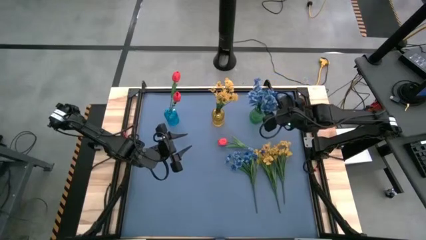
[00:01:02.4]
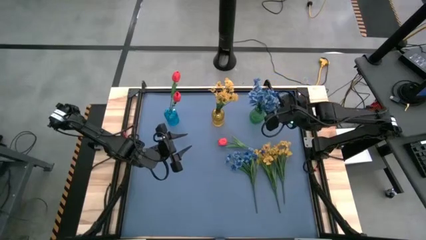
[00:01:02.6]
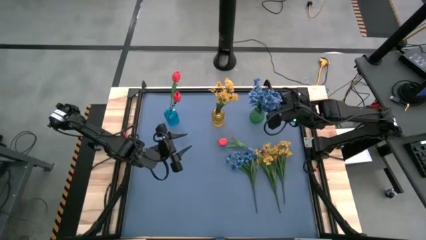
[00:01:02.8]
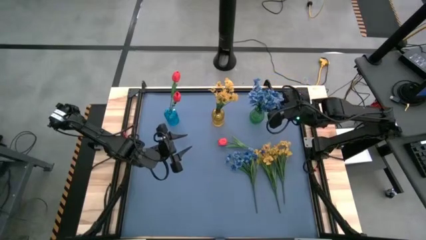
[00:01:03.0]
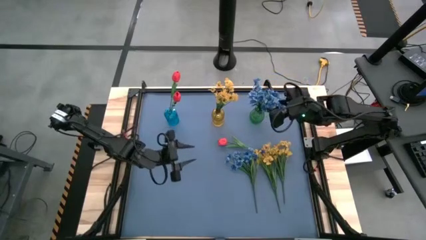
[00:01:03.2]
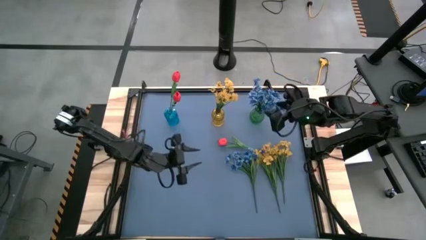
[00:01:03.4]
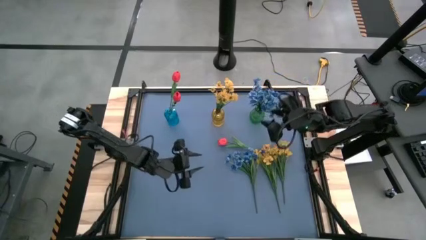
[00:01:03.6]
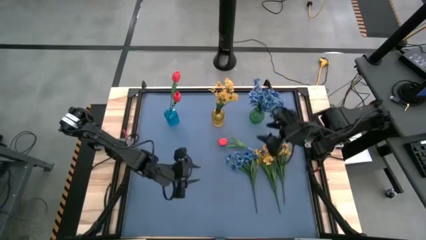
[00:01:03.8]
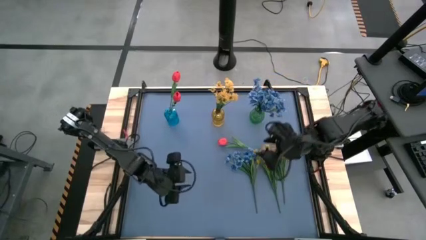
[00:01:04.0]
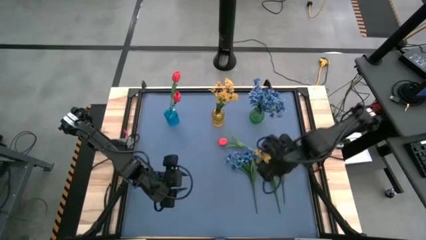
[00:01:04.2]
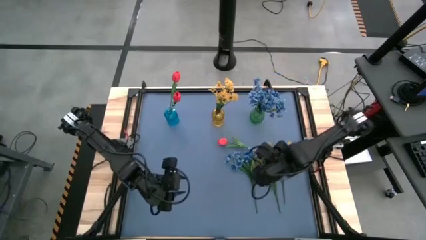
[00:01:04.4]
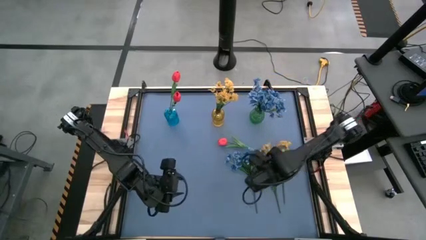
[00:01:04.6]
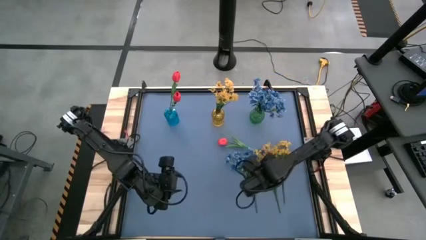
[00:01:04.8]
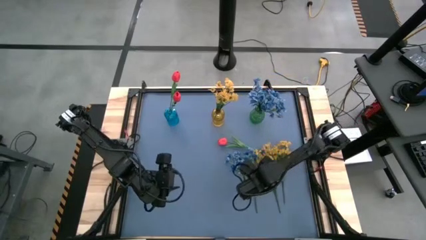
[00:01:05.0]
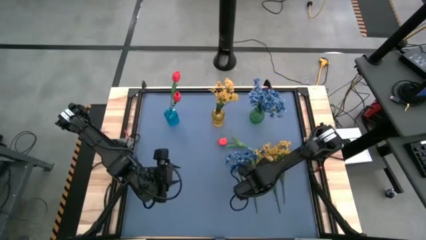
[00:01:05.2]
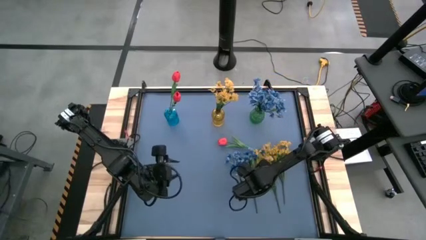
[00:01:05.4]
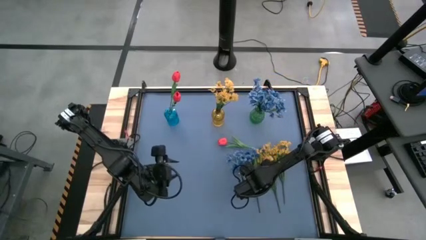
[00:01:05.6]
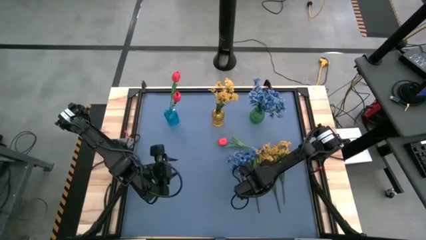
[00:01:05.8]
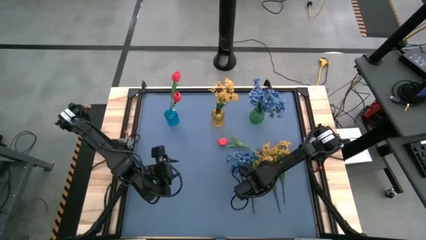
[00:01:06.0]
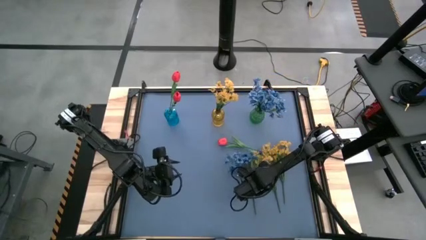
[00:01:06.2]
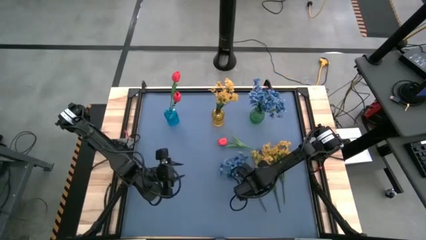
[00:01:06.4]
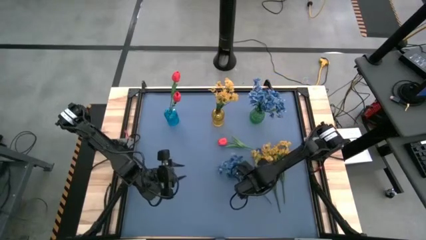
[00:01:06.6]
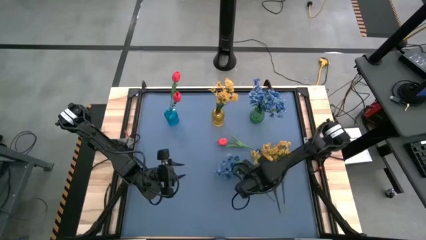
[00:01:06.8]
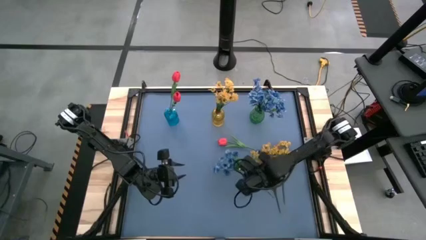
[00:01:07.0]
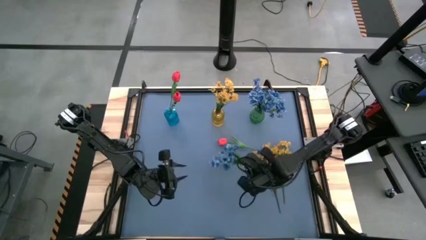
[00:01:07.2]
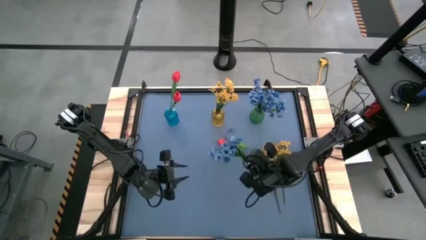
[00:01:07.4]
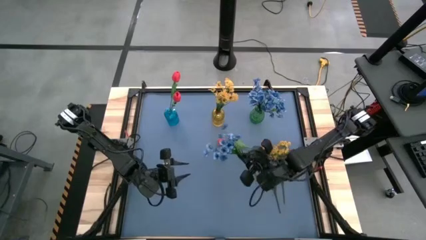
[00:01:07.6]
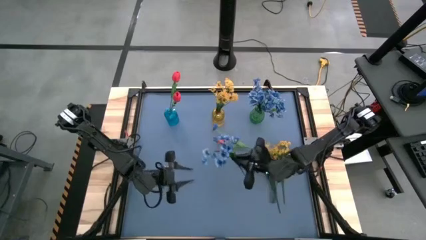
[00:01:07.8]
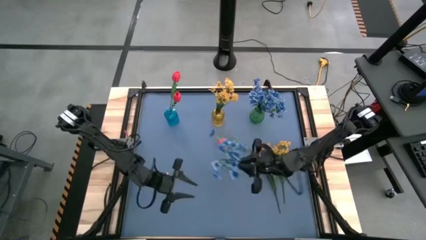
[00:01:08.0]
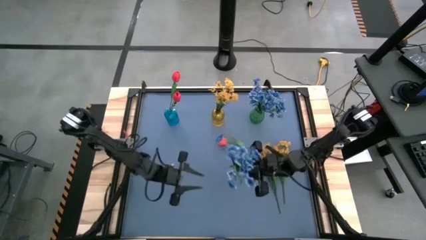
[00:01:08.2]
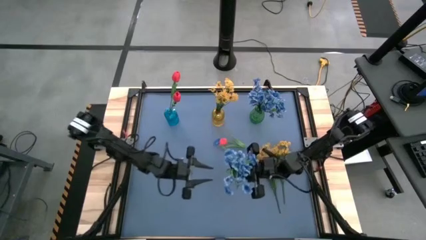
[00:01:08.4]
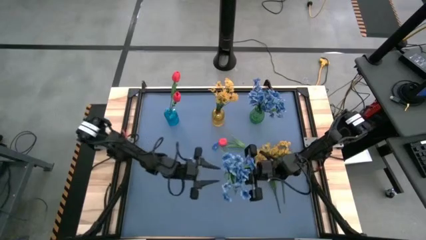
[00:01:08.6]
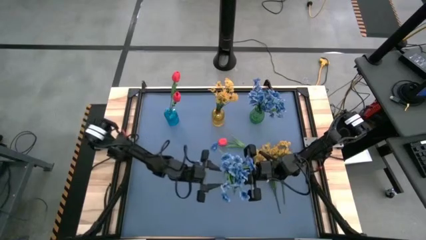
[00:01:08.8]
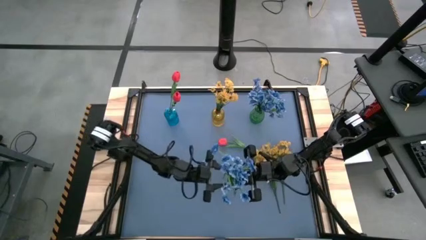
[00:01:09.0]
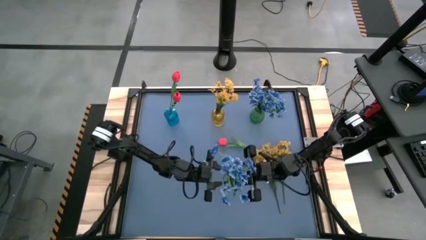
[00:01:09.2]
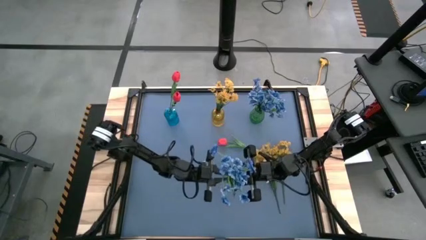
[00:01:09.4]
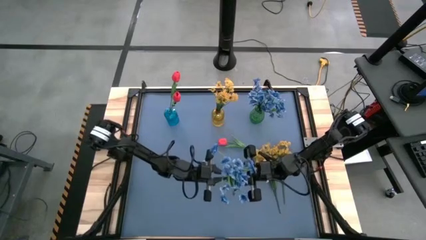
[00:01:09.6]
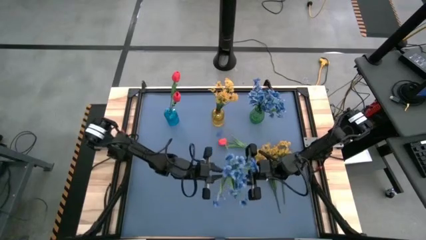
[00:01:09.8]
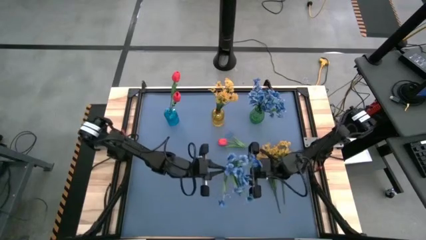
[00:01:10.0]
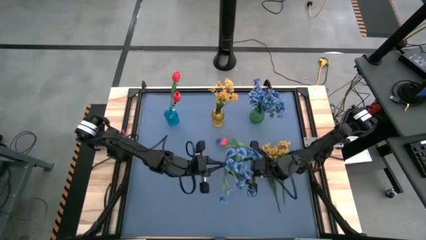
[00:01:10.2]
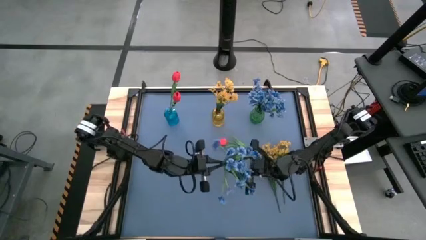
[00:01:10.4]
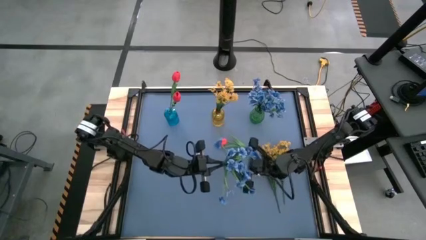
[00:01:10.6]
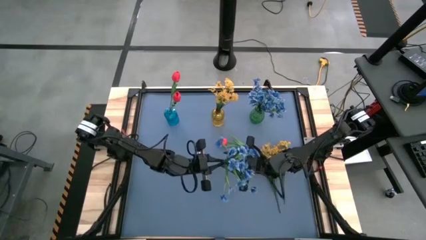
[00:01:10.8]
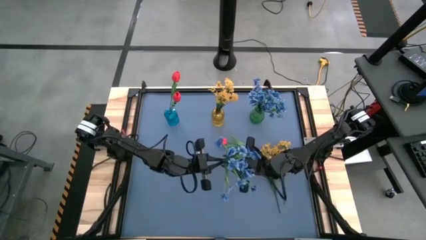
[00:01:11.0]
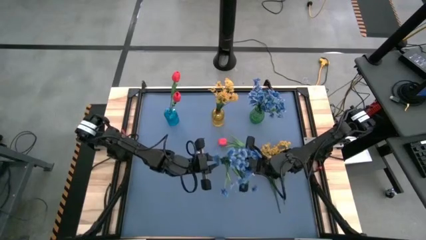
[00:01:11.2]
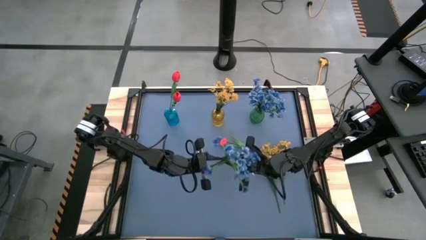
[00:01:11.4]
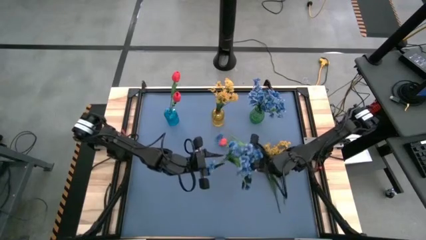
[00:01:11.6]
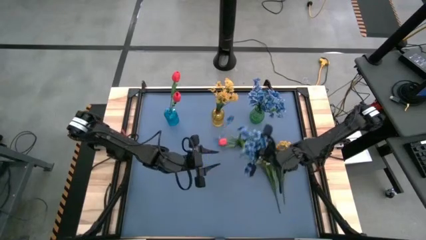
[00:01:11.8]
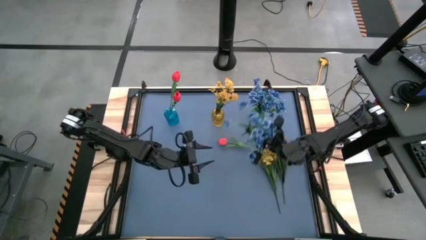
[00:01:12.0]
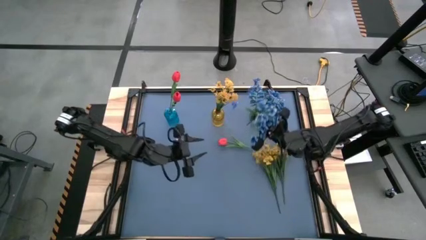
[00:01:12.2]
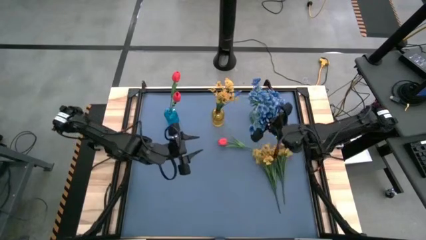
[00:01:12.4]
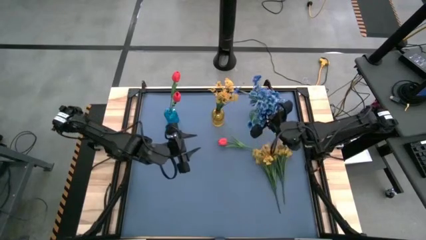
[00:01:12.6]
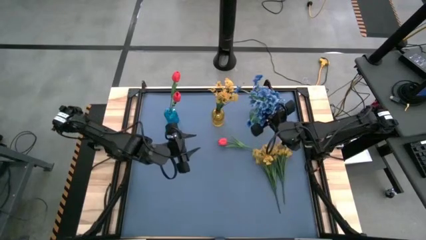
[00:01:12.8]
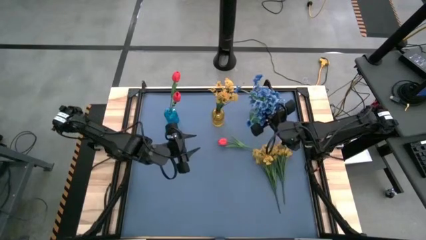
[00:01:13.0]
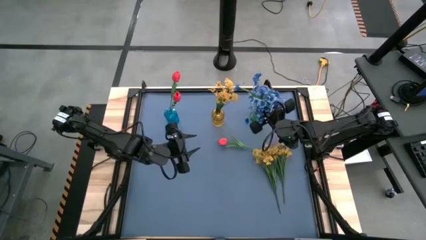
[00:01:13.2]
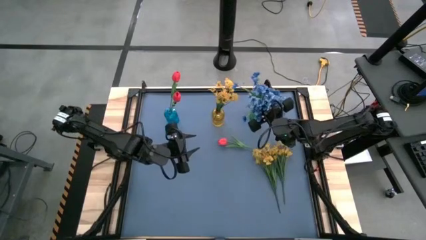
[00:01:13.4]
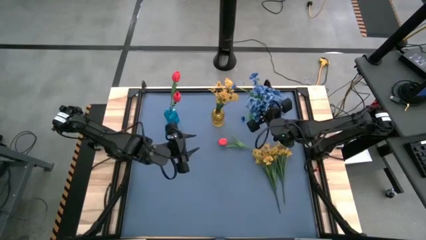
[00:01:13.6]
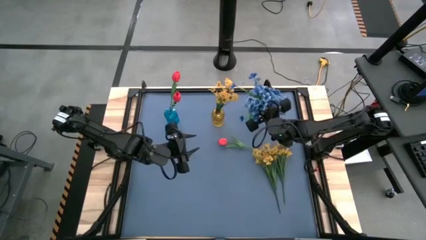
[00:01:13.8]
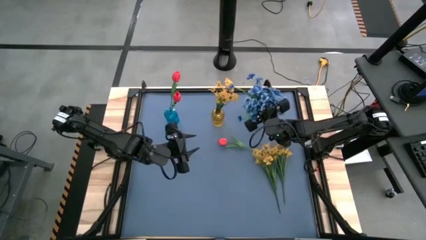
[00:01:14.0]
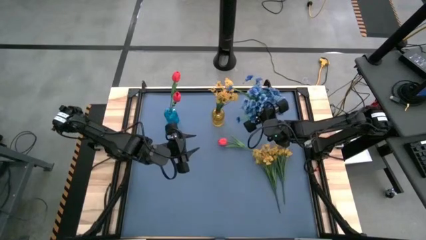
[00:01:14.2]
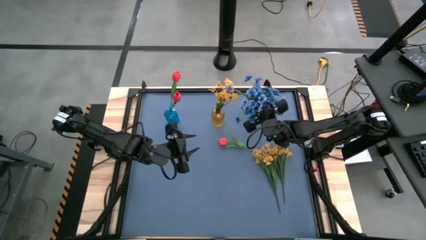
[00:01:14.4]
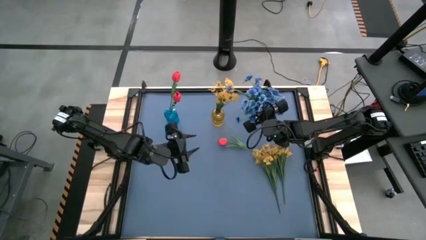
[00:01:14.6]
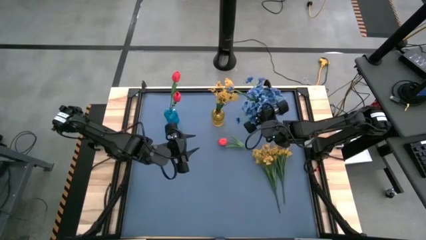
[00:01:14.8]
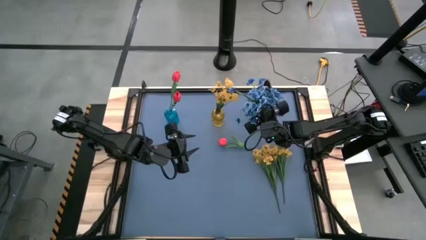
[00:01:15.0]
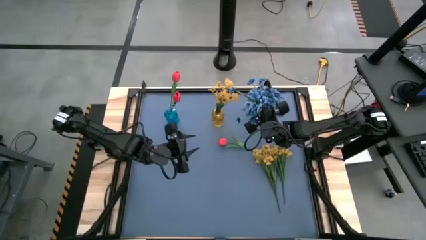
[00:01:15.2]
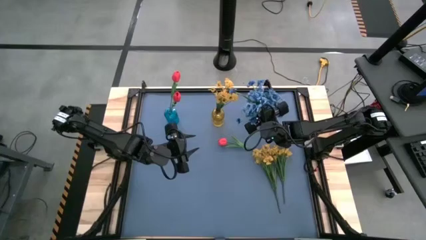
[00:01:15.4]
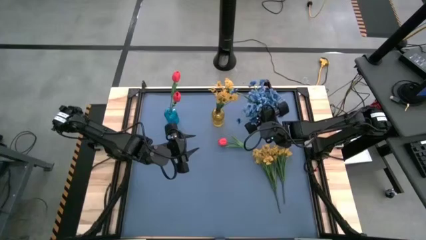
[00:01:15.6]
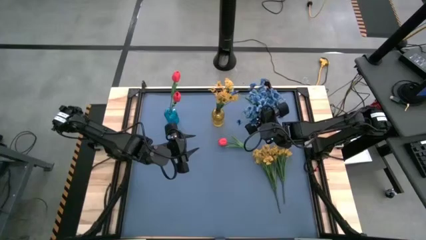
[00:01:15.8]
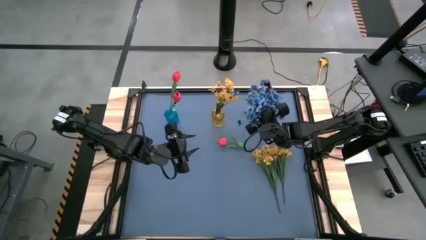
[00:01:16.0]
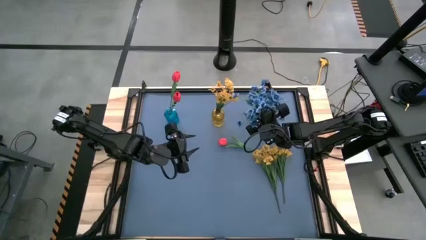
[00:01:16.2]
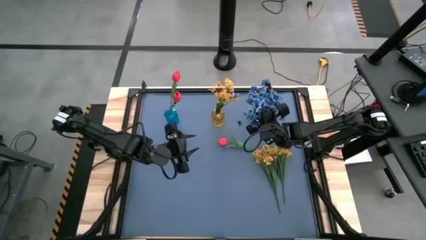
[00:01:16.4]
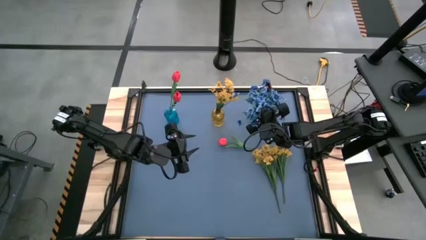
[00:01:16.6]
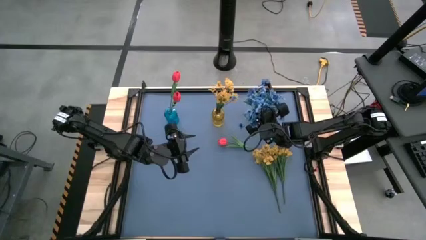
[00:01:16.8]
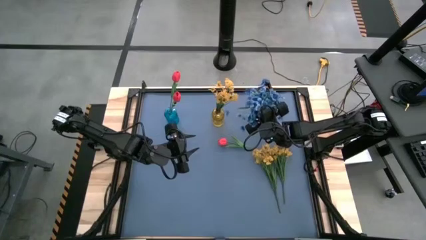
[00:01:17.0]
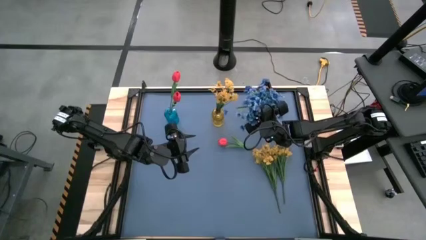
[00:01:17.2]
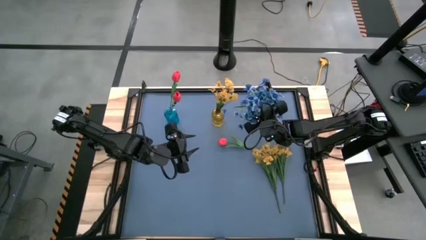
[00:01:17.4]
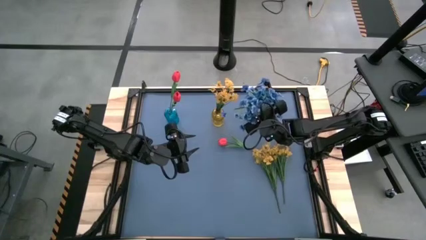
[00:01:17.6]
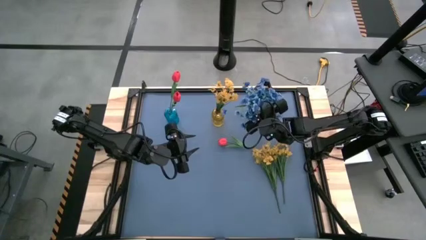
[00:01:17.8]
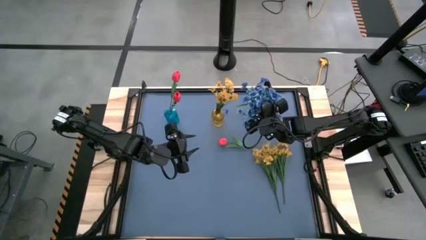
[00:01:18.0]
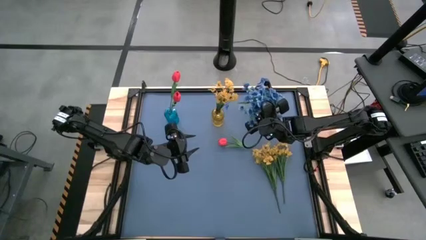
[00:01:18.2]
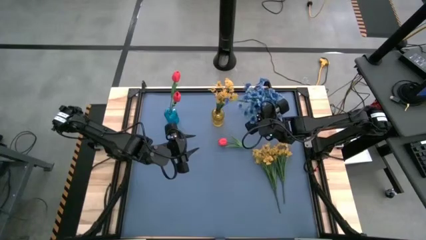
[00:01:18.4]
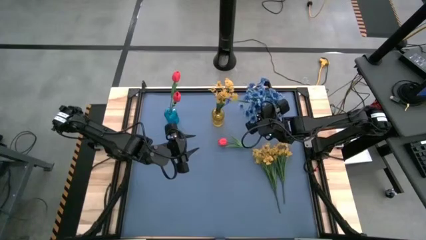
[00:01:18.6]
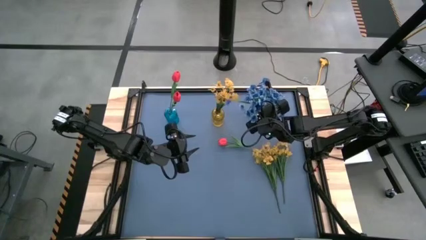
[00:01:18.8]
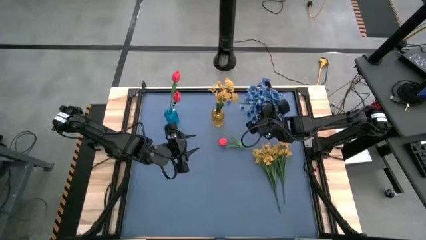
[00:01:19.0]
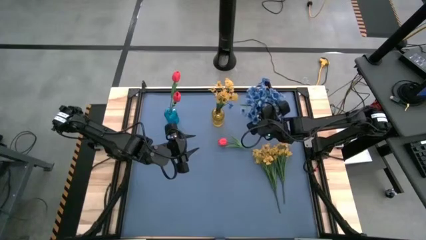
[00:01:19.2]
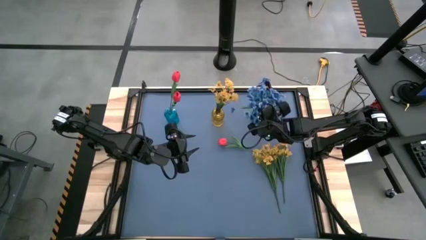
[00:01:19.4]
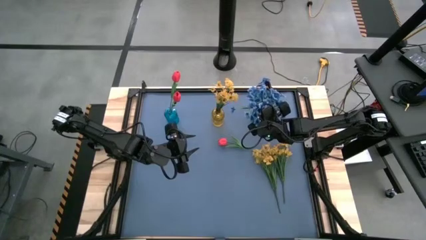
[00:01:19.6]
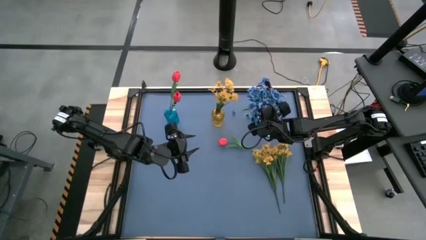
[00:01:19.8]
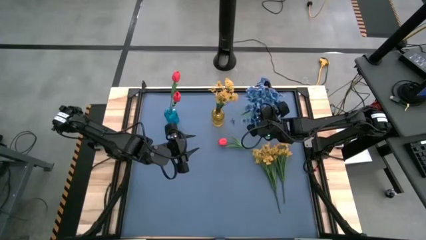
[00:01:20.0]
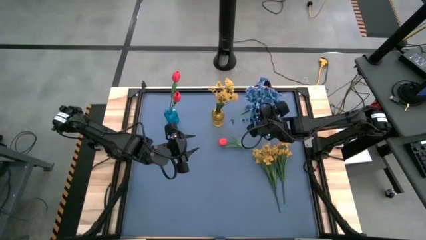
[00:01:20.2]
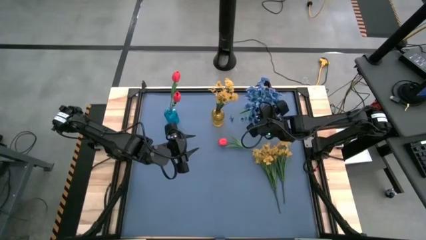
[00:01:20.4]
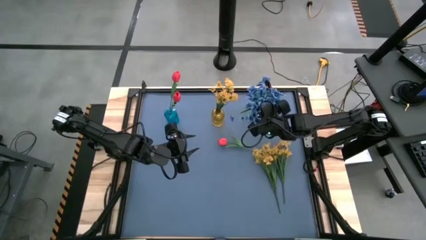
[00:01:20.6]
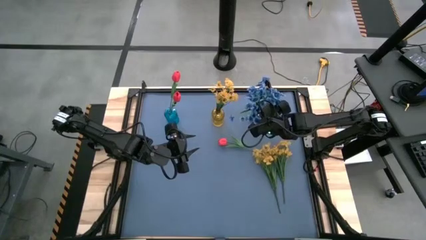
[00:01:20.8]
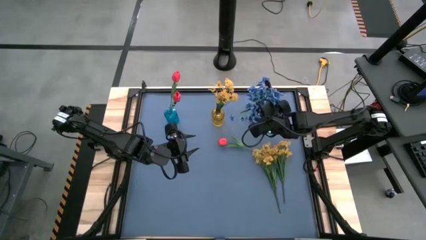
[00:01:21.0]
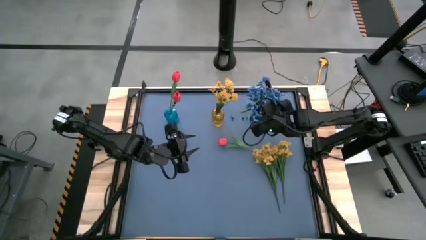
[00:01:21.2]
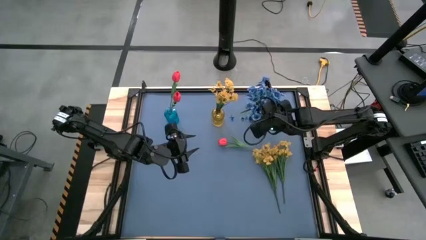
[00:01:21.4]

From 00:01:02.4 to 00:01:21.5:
Task: Sort flowers into vase by color
Put the blue flowers into the green vase
